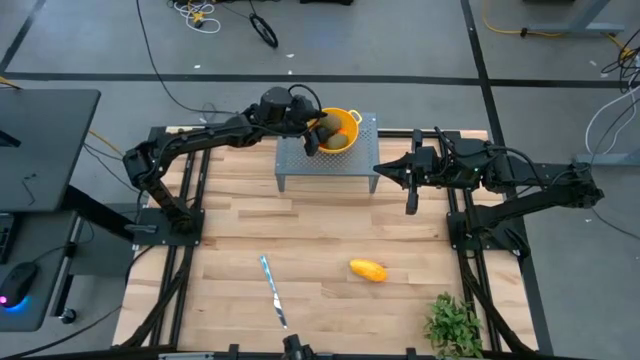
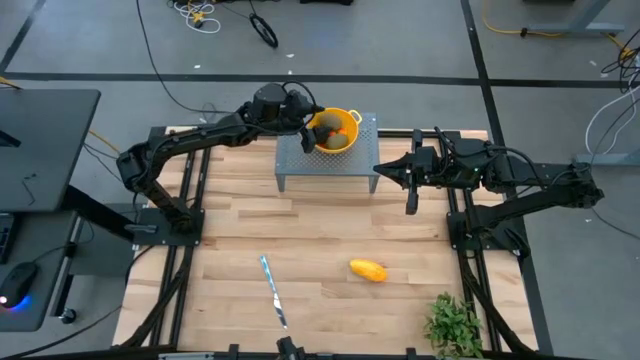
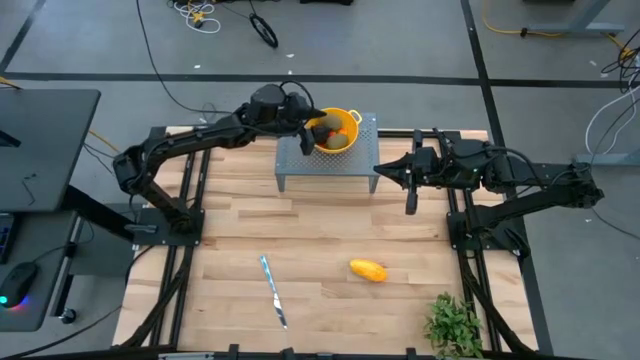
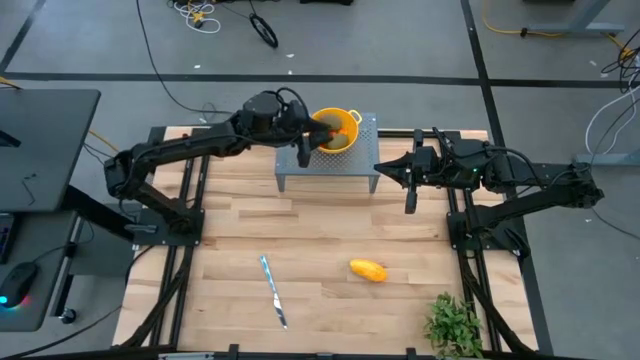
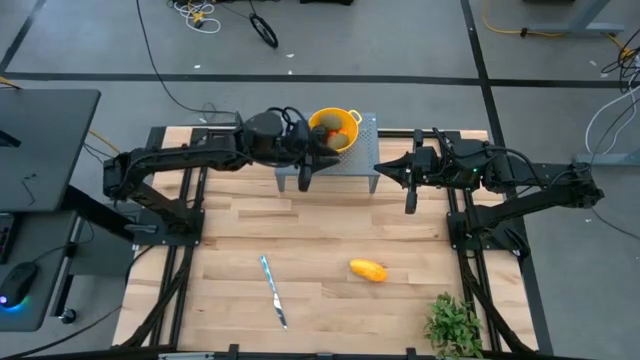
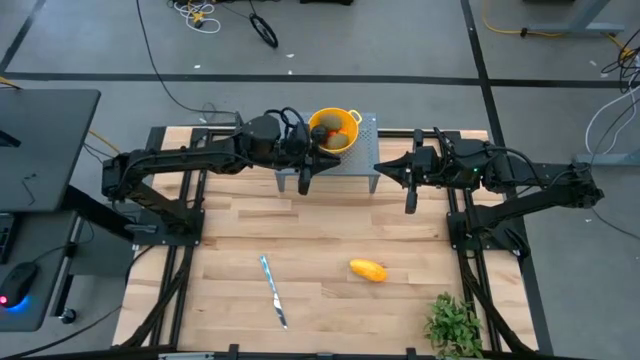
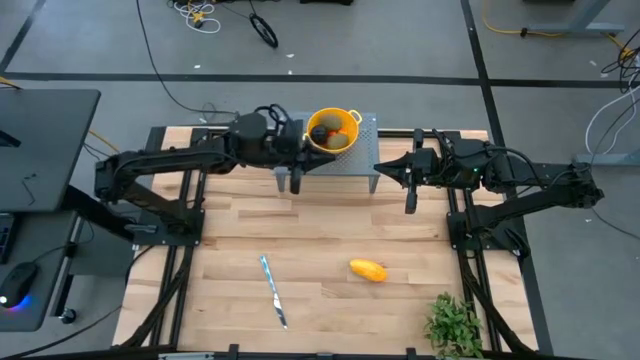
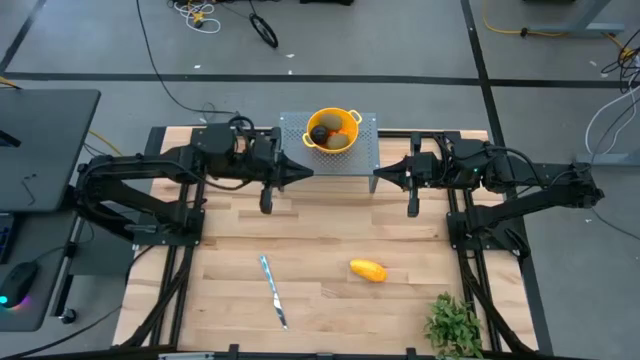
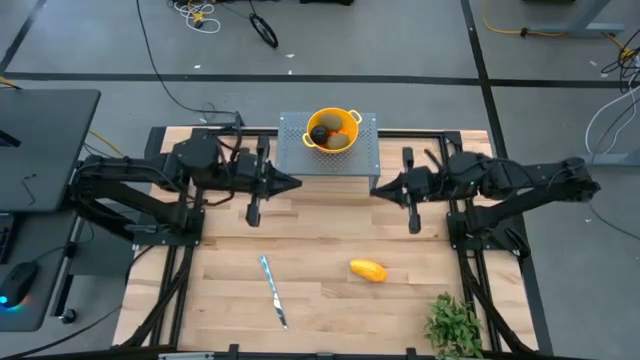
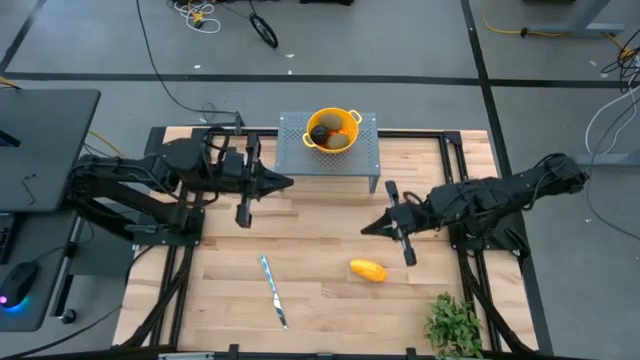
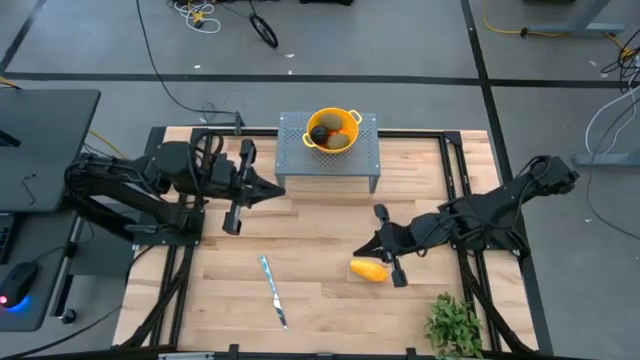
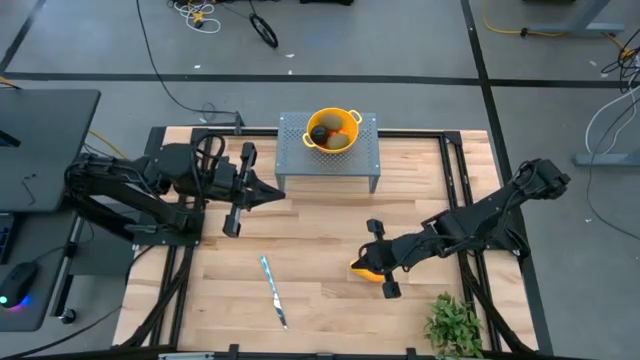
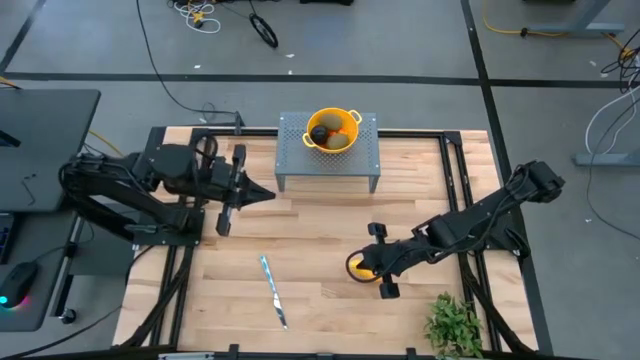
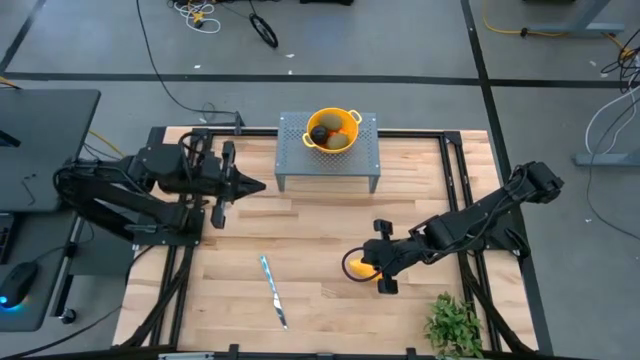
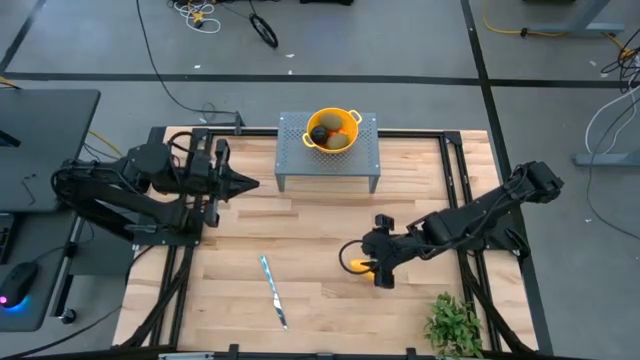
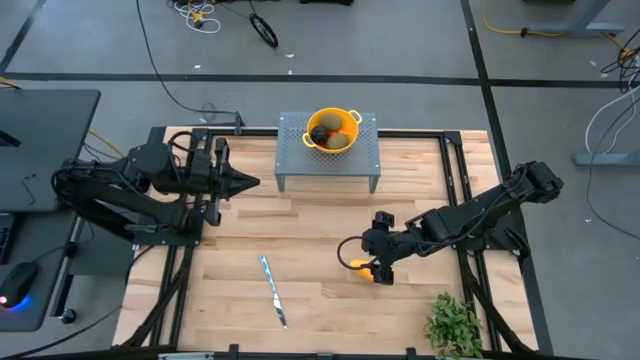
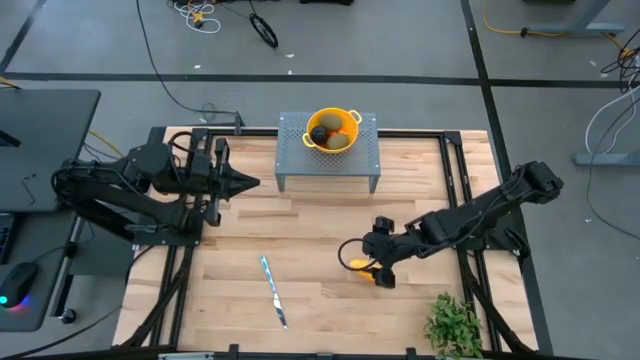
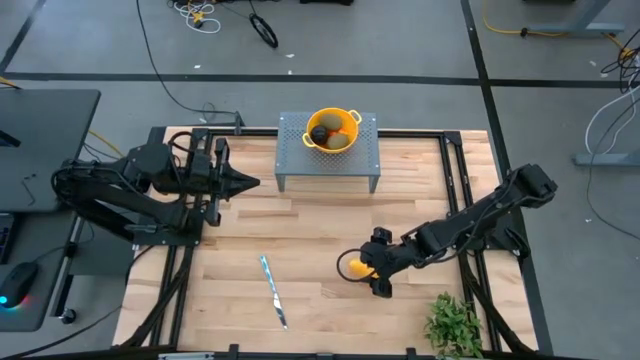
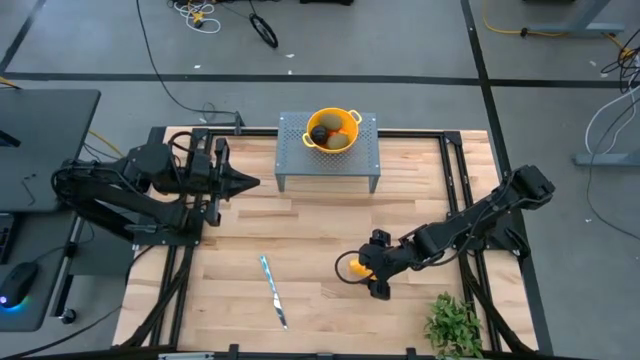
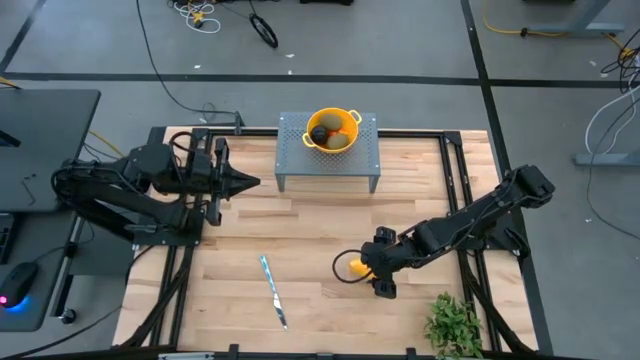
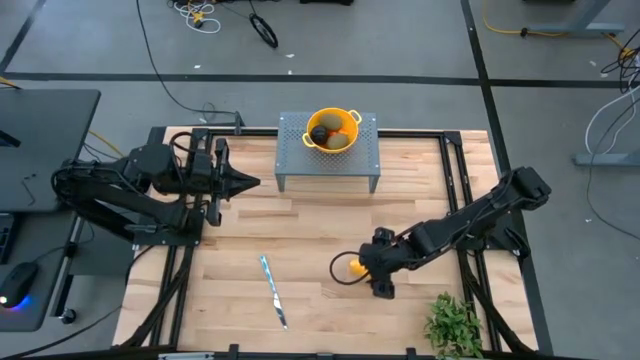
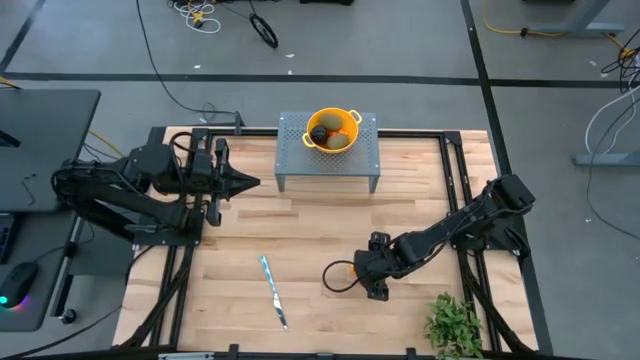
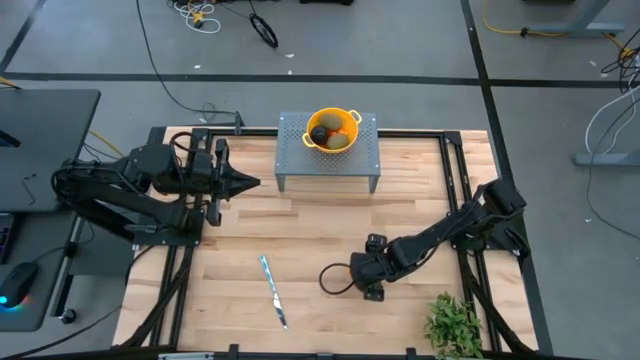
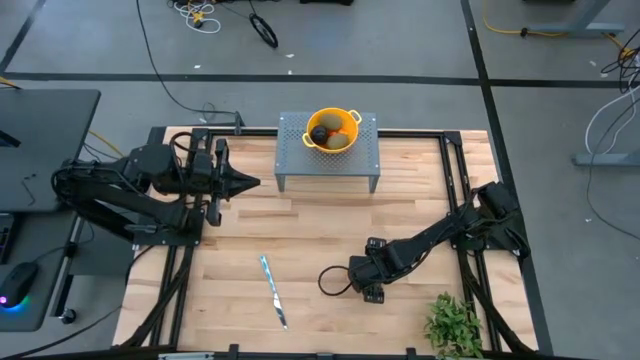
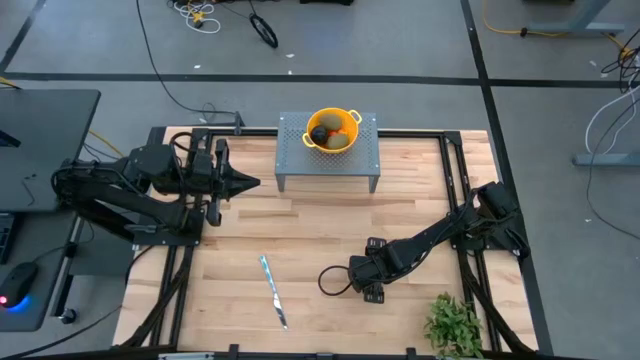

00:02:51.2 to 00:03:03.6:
Task: Pick & Place Fruit
Put the mango into the yellow colander bowl on the shelf

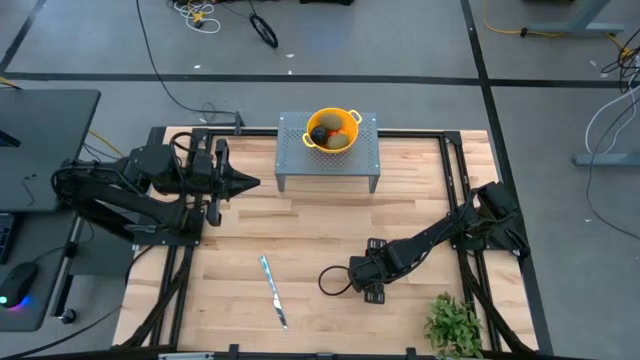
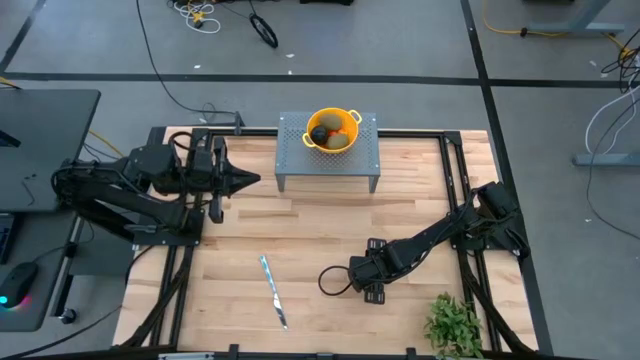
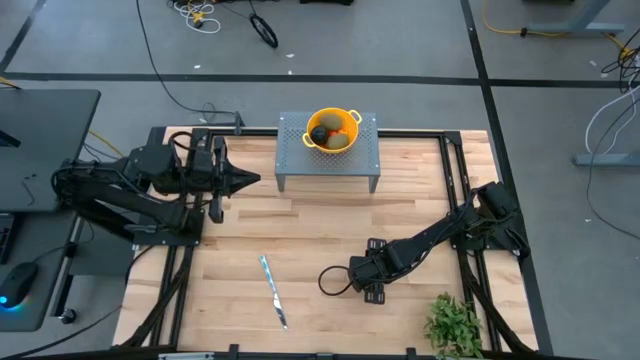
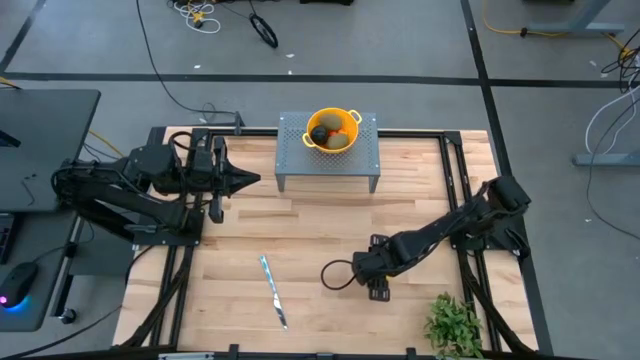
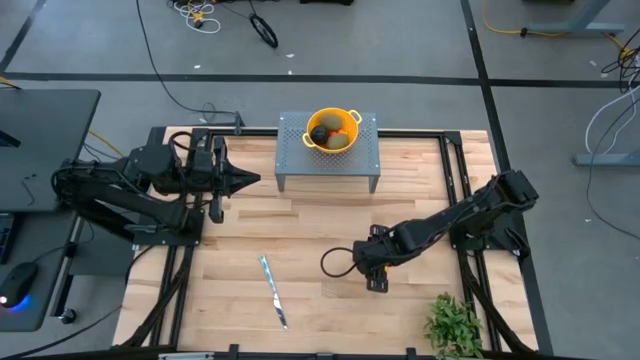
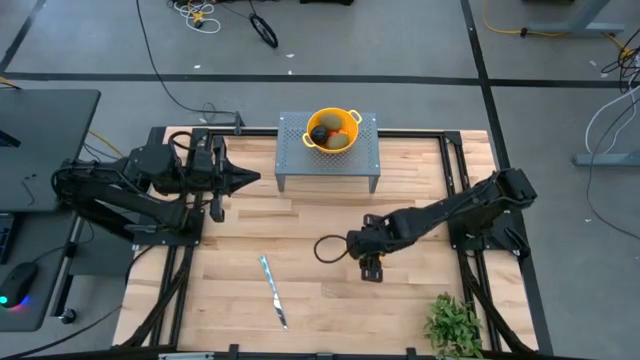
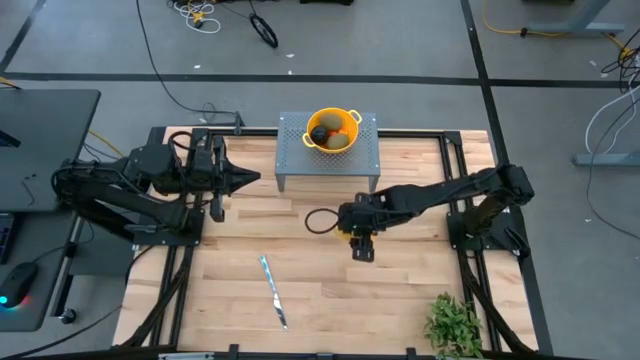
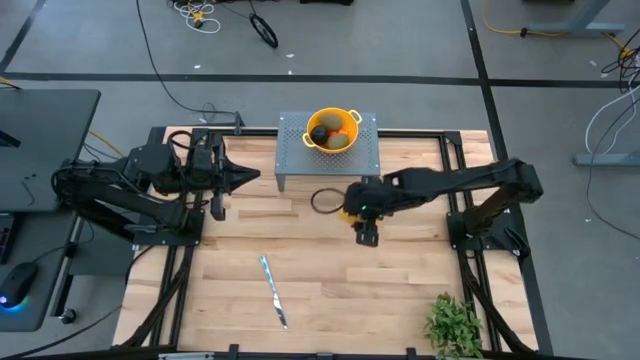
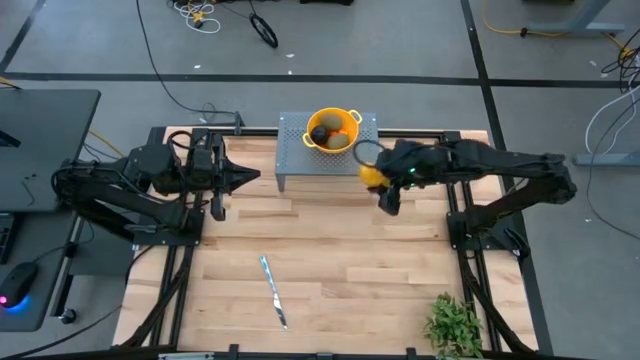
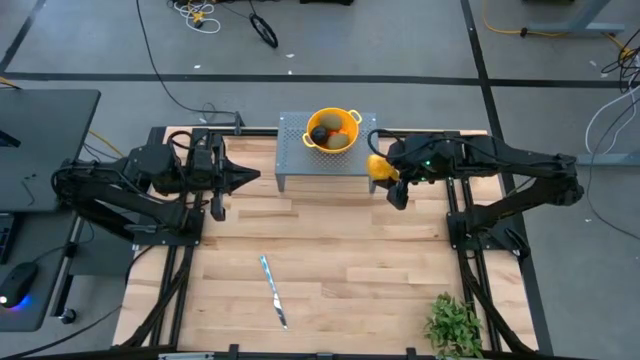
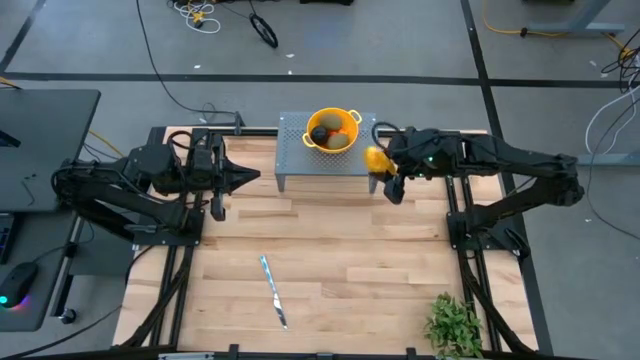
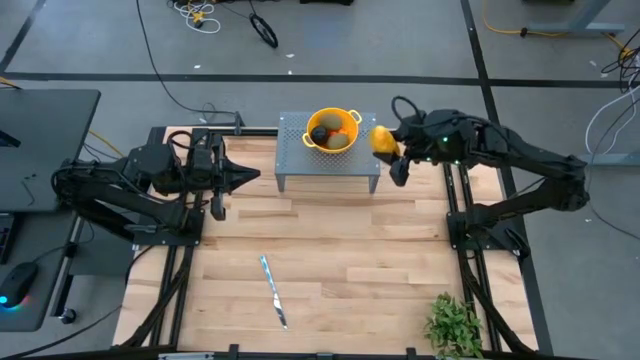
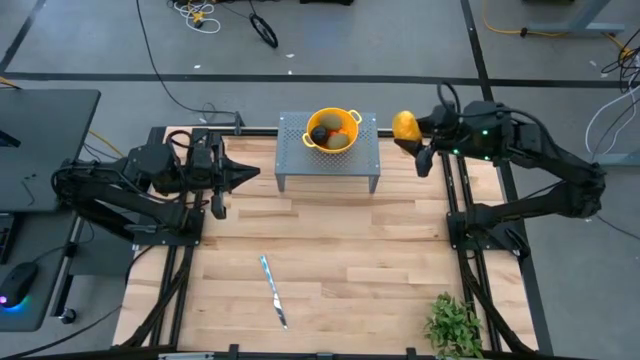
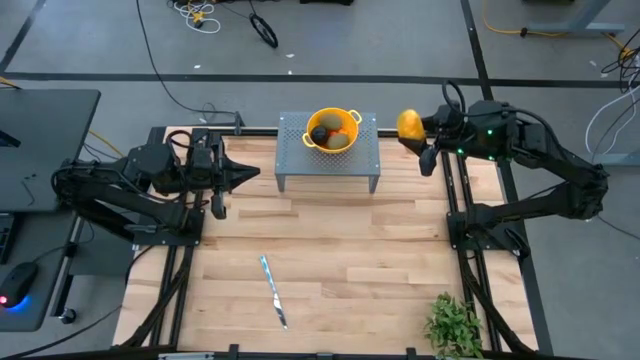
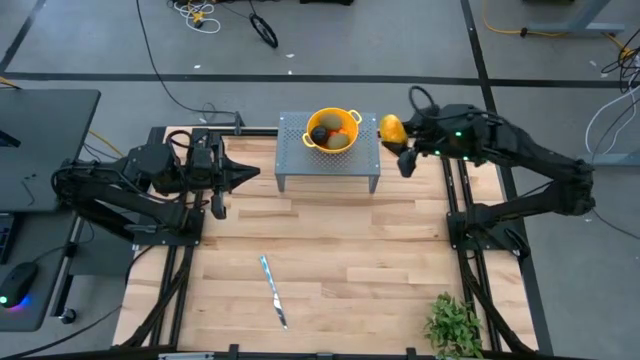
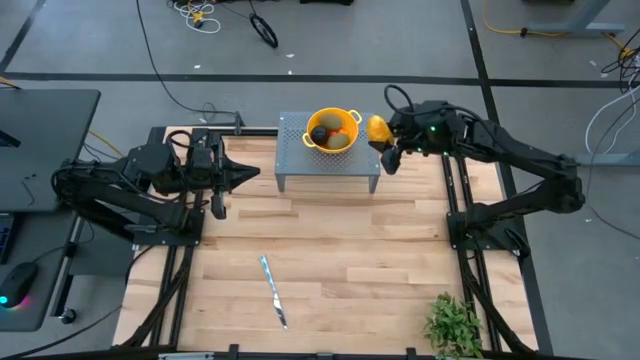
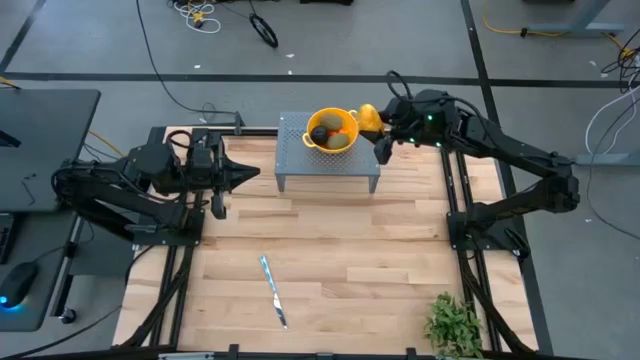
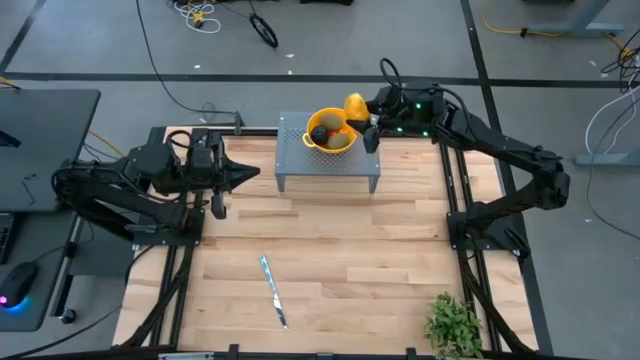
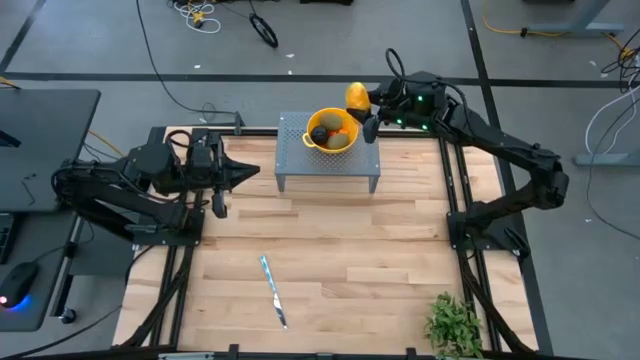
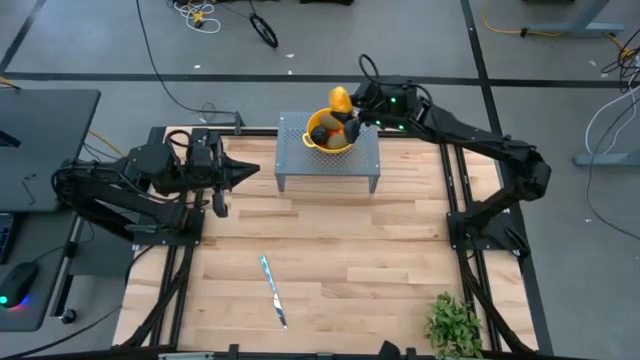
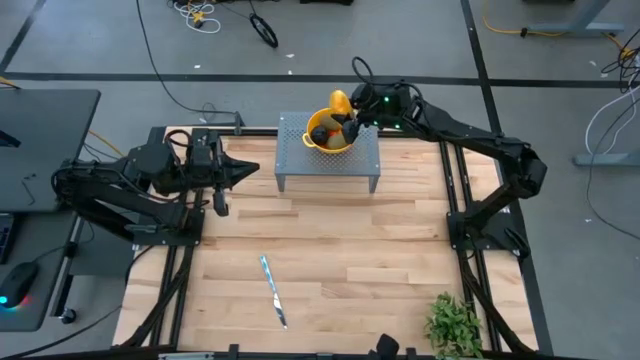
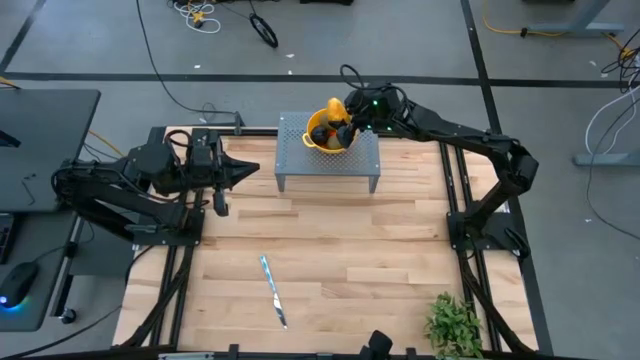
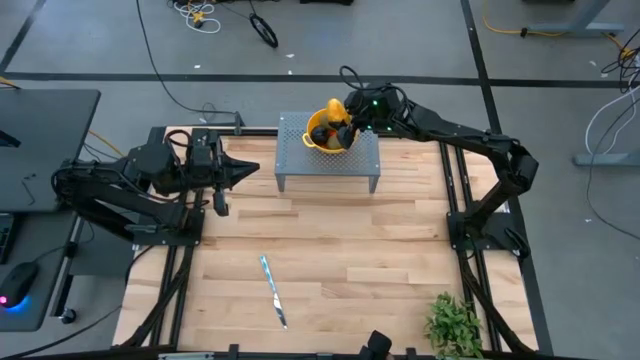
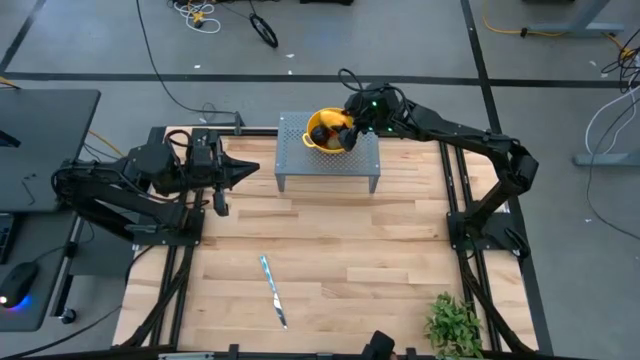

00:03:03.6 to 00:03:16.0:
Put the mango into the yellow colander bowl on the shelf
